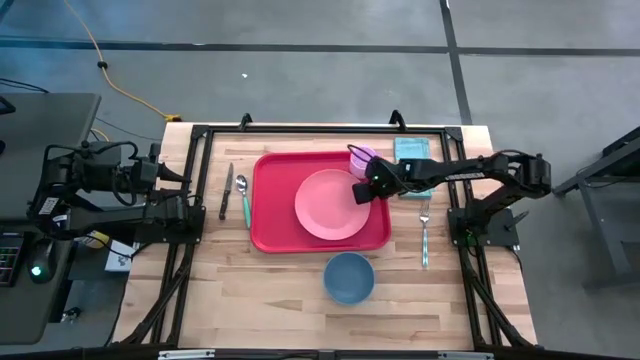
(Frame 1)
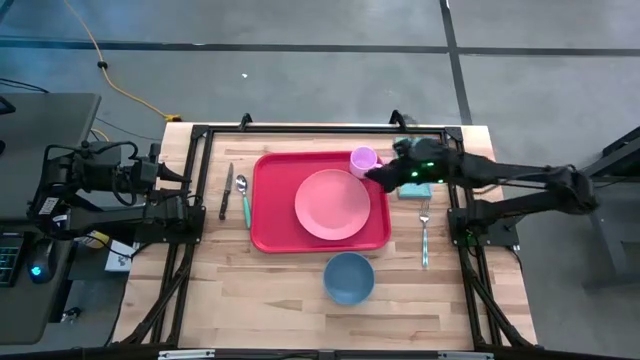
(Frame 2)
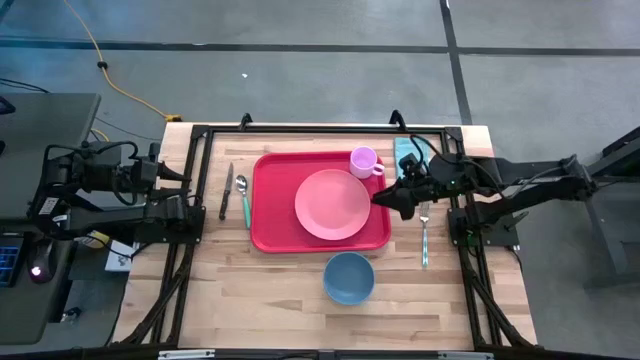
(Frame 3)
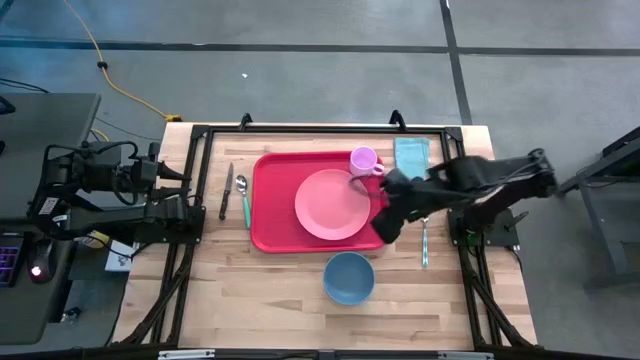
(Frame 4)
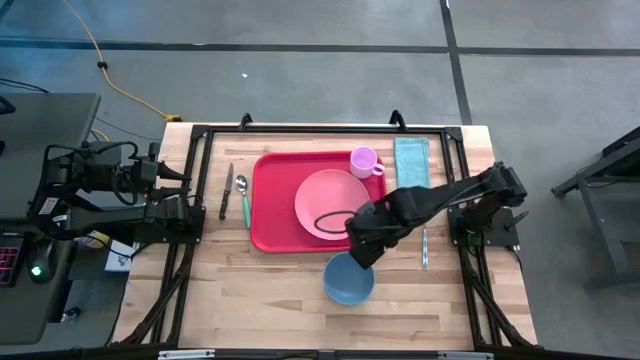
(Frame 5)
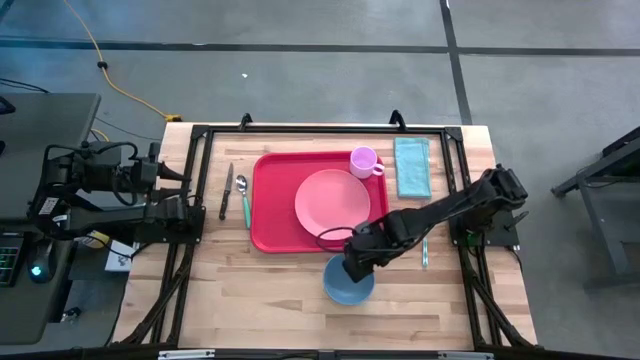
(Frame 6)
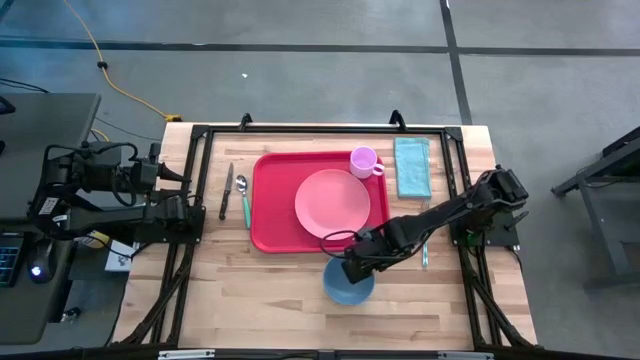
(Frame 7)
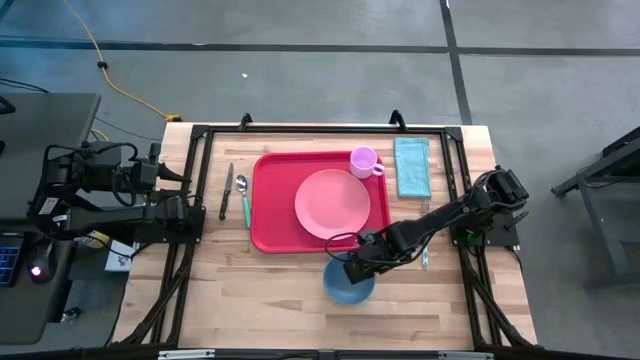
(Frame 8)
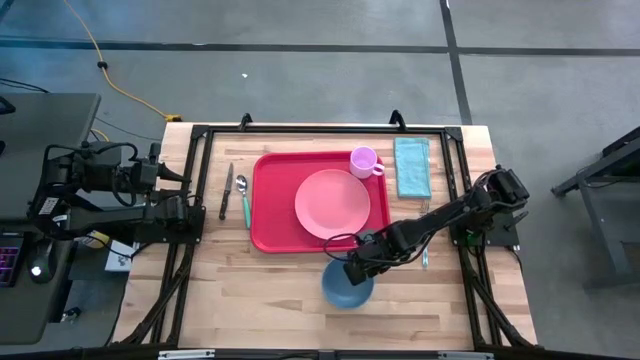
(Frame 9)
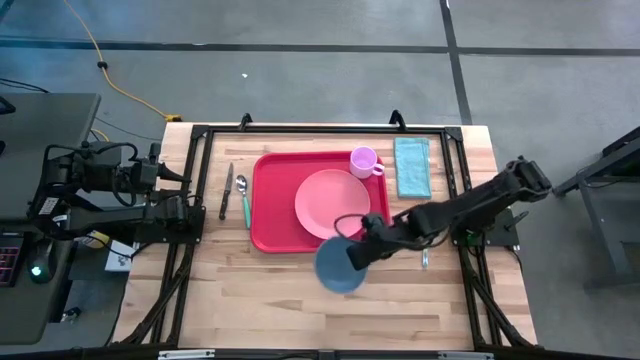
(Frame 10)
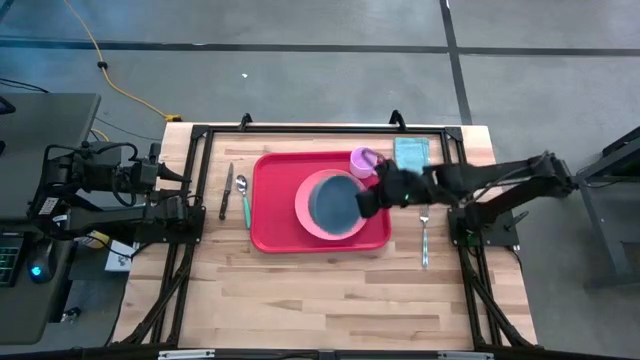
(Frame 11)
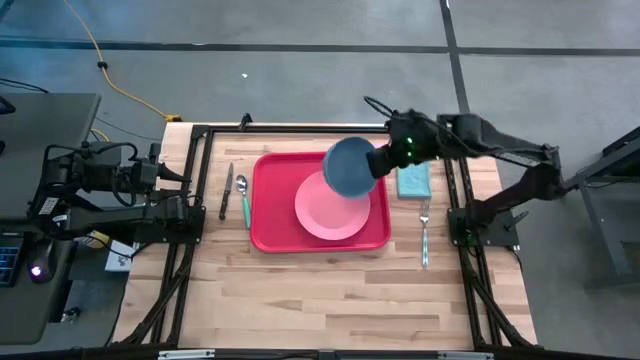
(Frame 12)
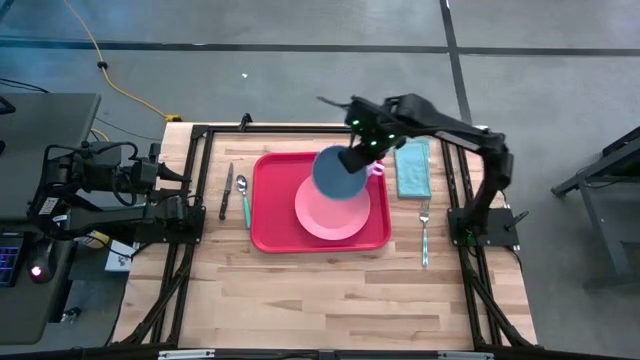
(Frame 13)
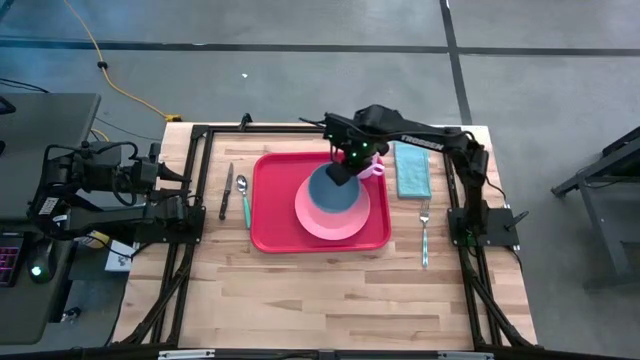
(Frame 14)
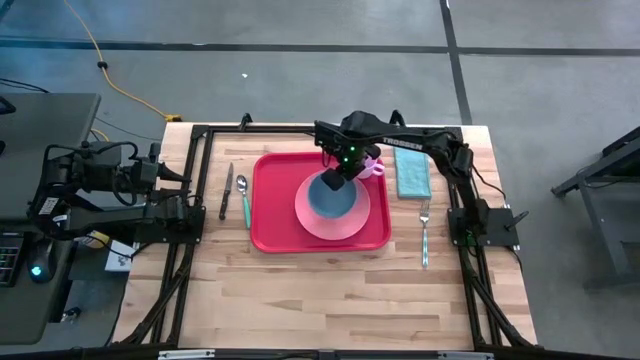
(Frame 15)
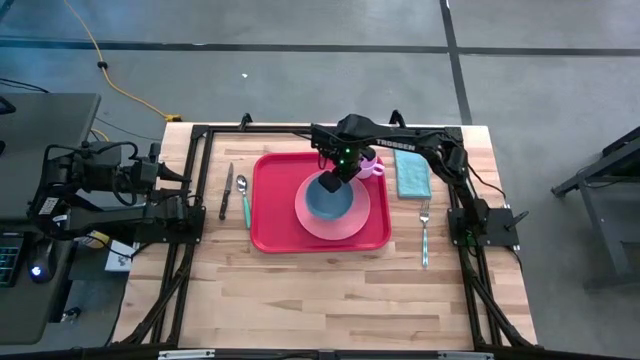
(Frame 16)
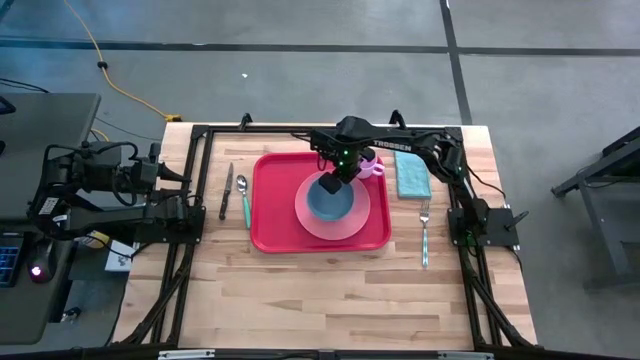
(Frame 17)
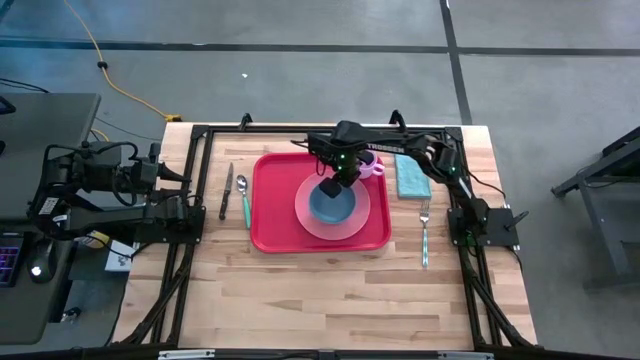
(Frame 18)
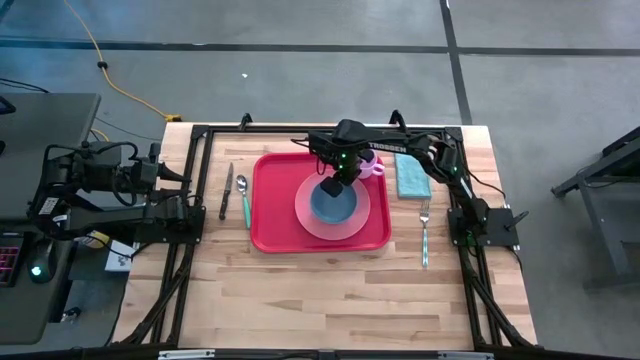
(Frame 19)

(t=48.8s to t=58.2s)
Task: Set up tray
Put the blue bowl on the pink plate on the tray

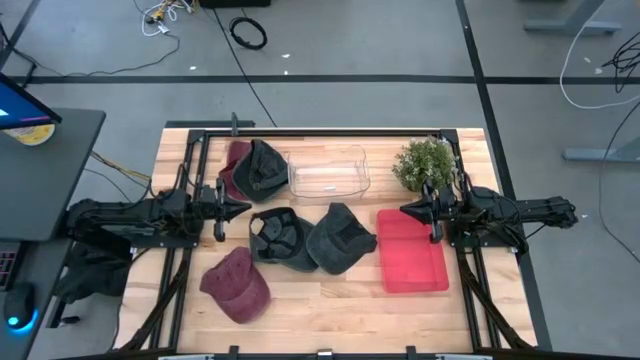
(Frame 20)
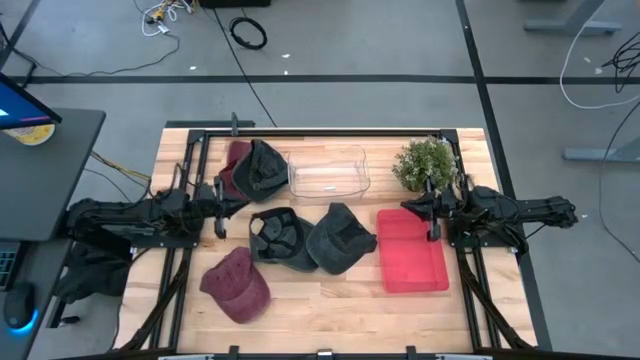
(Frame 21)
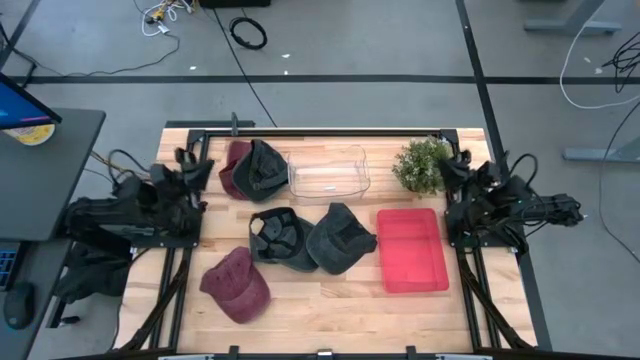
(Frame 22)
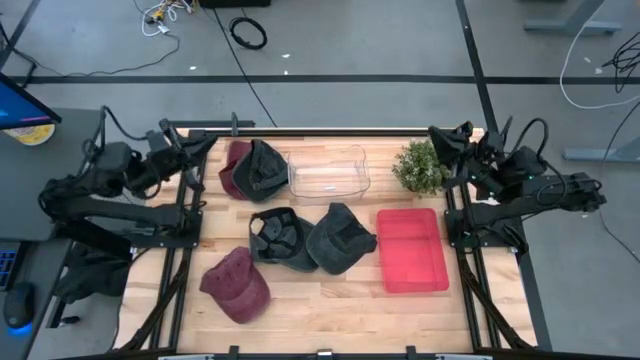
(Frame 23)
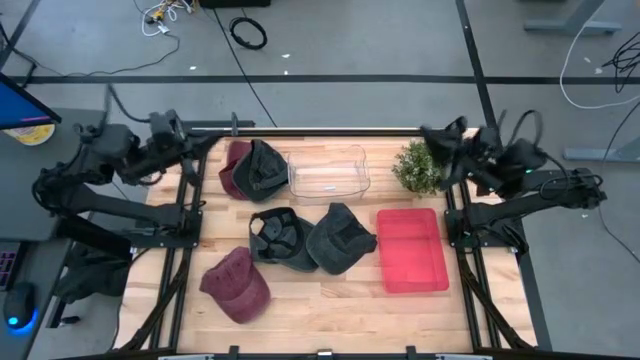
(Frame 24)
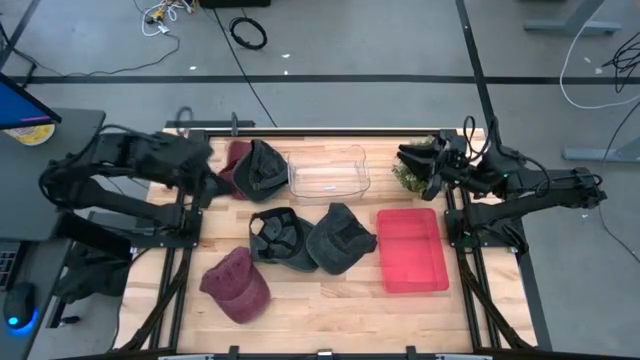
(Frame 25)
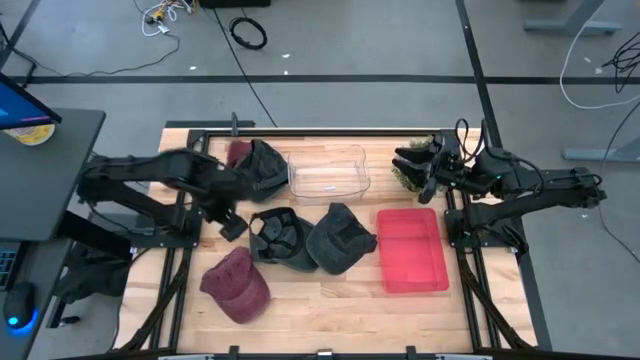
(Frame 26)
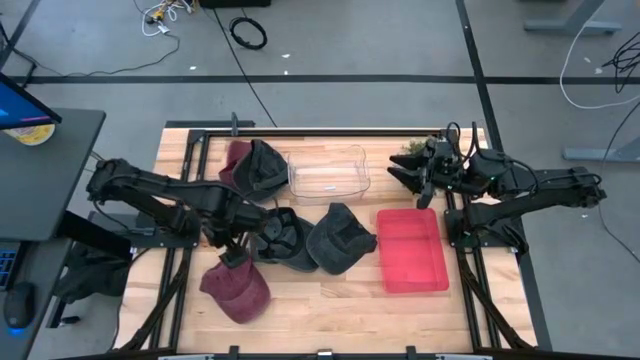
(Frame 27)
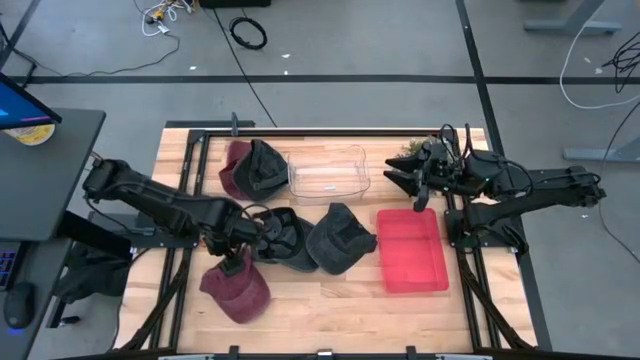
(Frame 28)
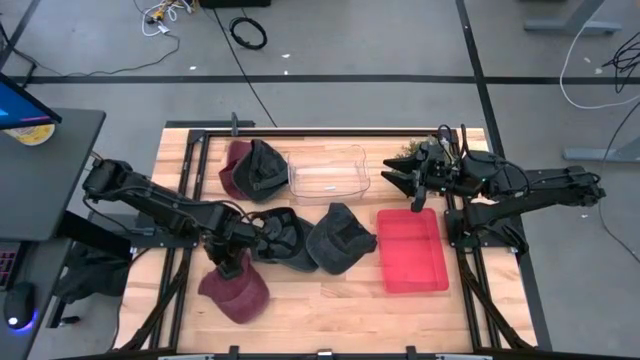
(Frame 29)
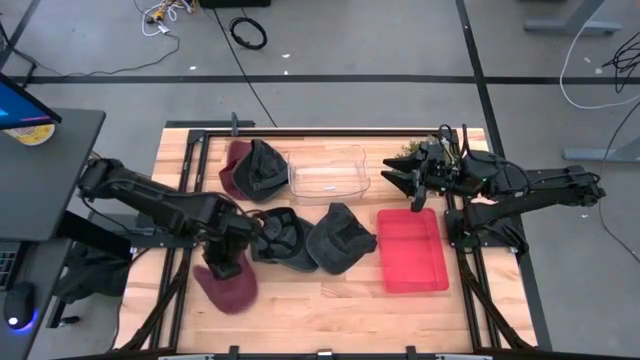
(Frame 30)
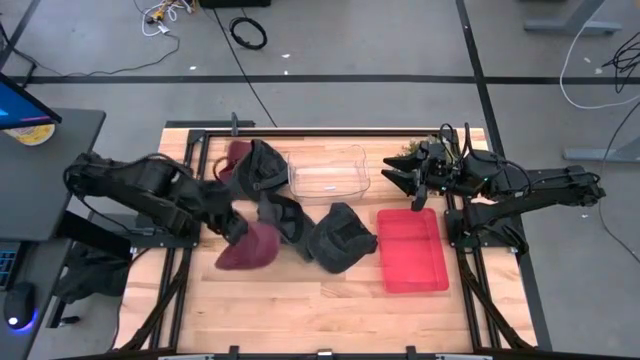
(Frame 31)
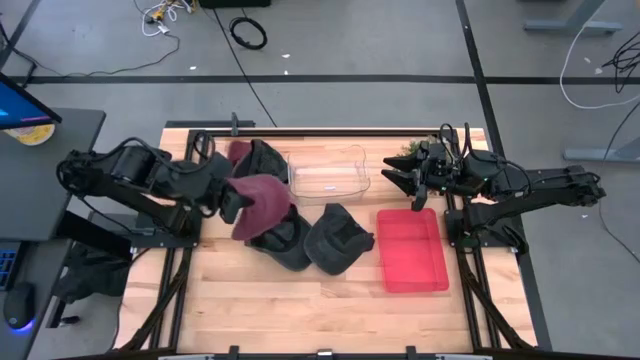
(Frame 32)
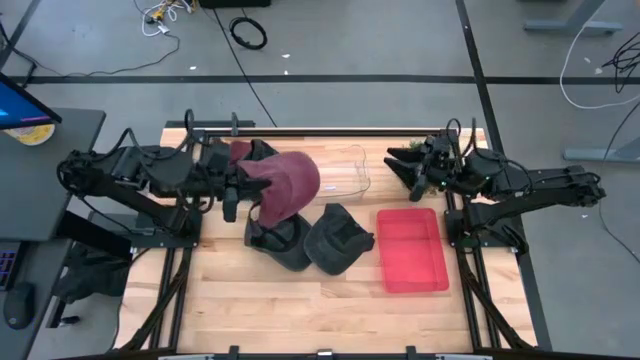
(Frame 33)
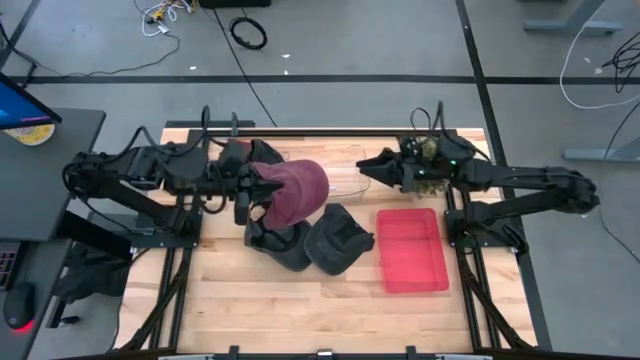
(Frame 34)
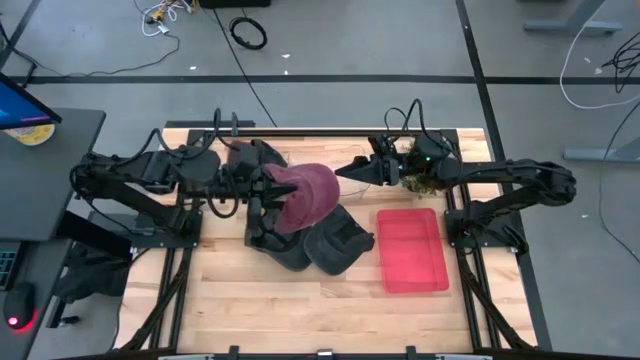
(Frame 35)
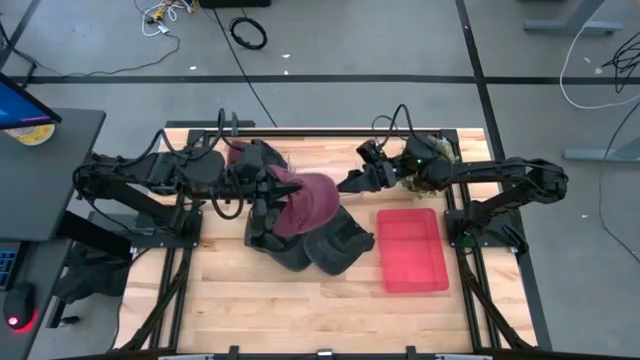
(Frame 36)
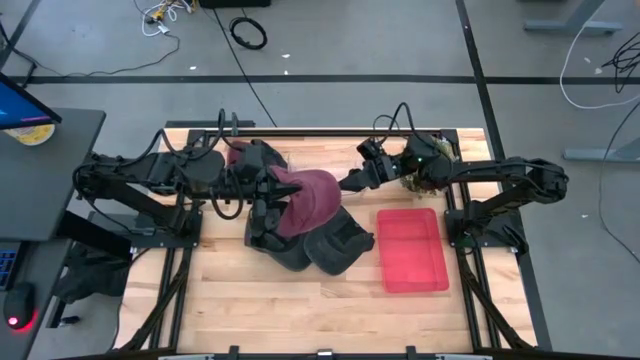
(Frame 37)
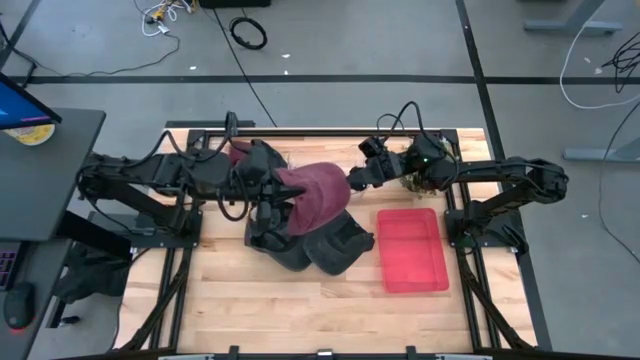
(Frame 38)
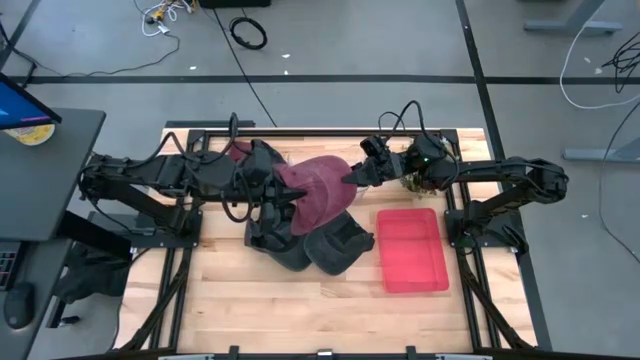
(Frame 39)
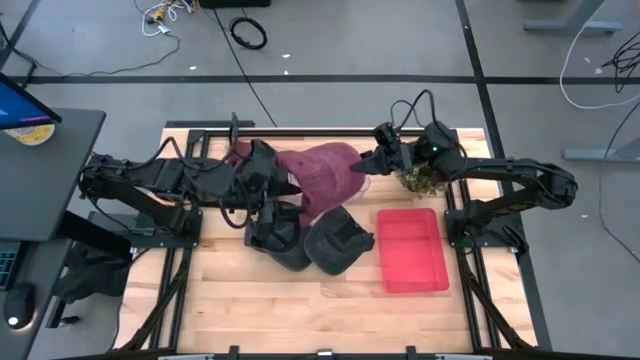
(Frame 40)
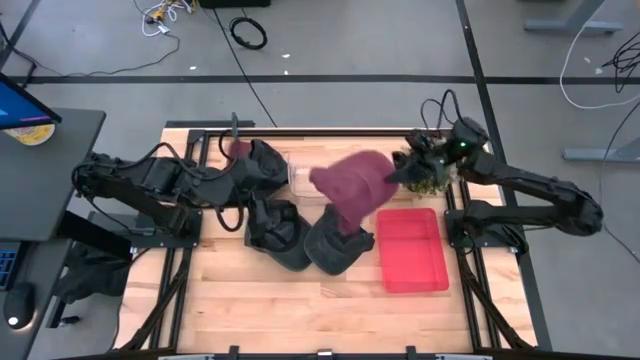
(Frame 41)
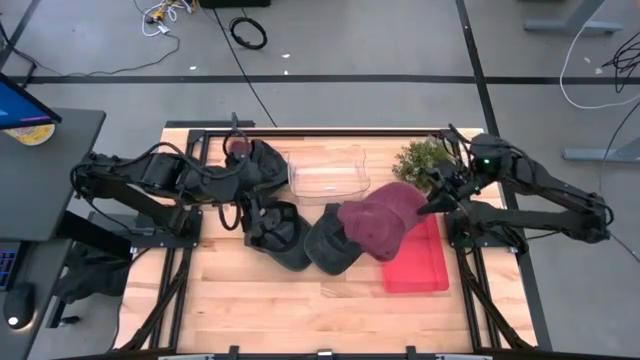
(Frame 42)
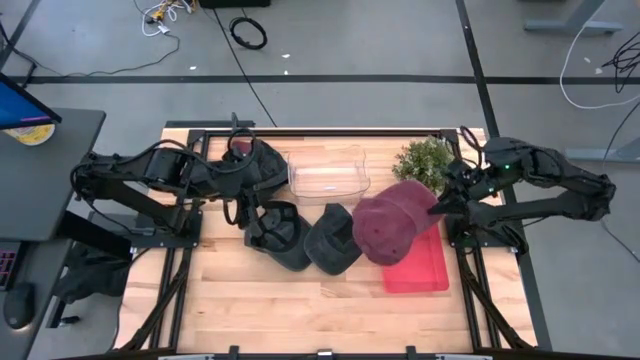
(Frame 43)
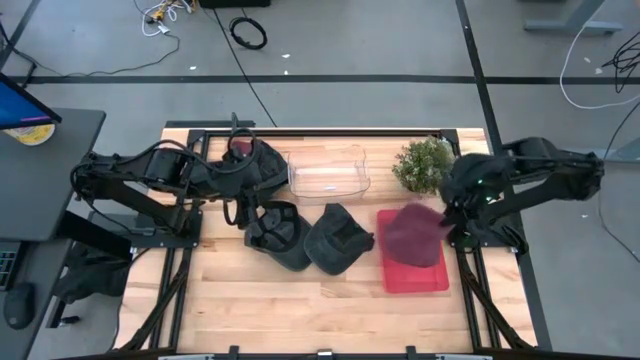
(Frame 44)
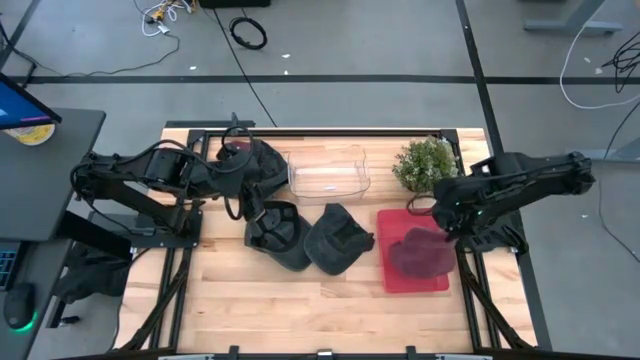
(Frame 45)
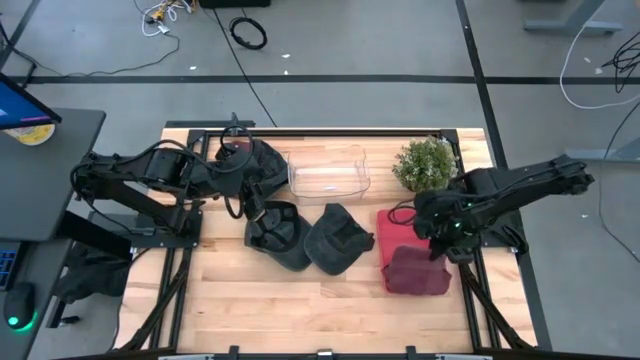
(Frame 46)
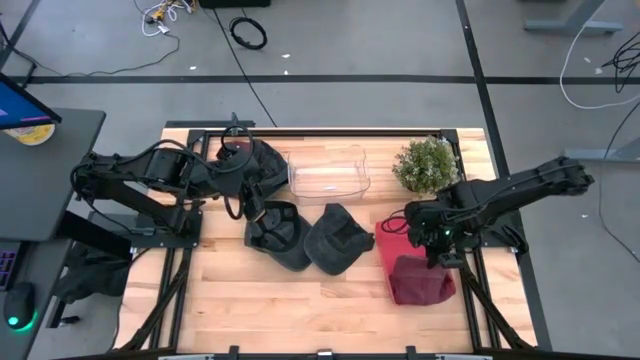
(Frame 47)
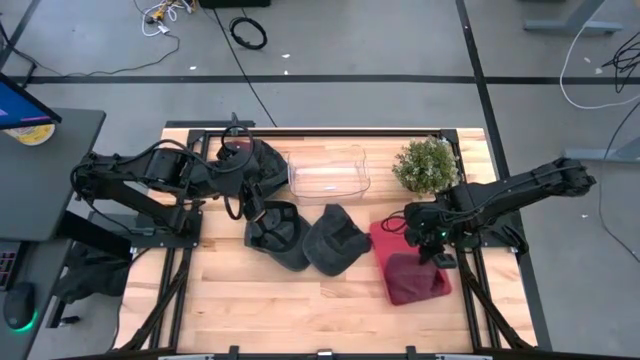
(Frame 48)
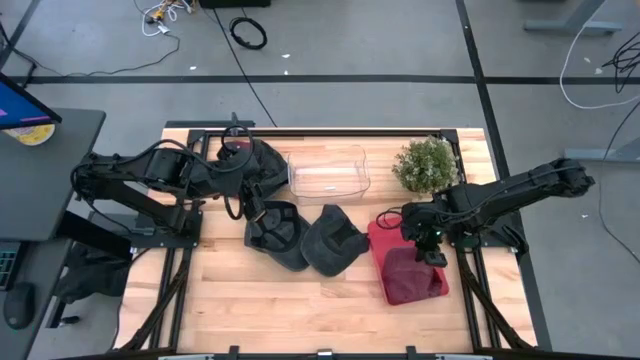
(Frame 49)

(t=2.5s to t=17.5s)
Task: Pick & Place hat
Put the bottom red cap into the red bin
